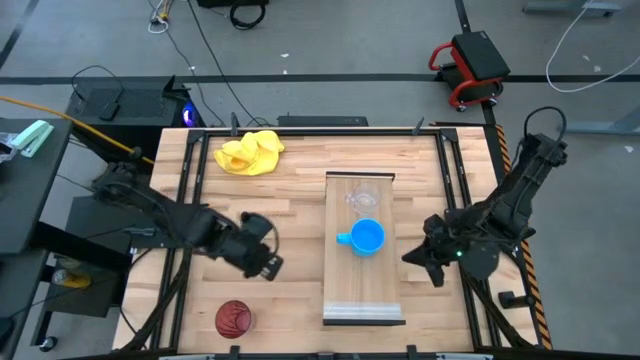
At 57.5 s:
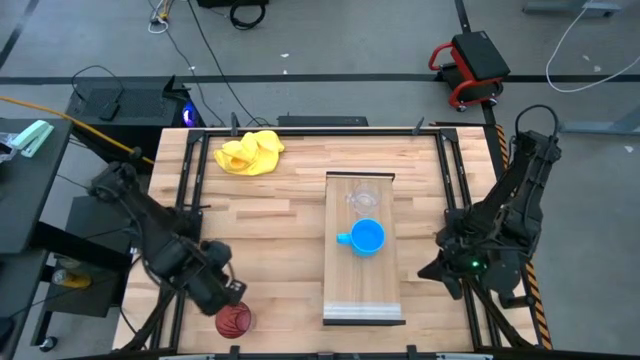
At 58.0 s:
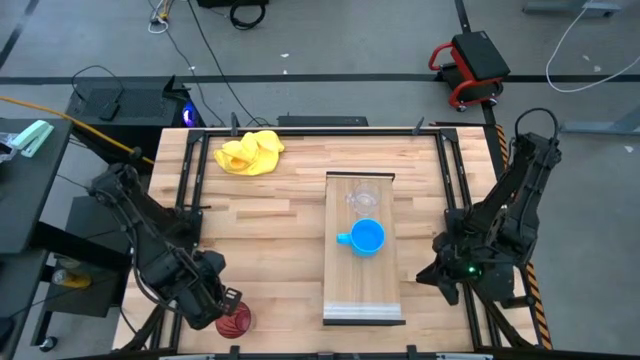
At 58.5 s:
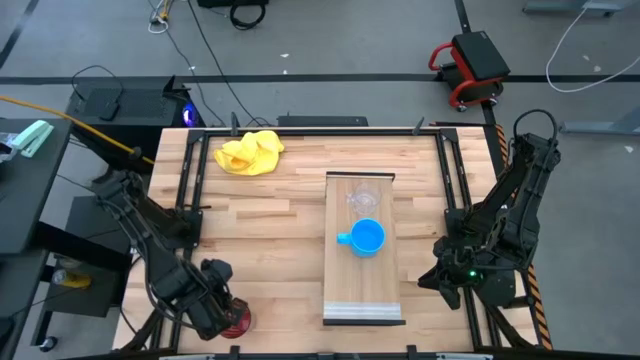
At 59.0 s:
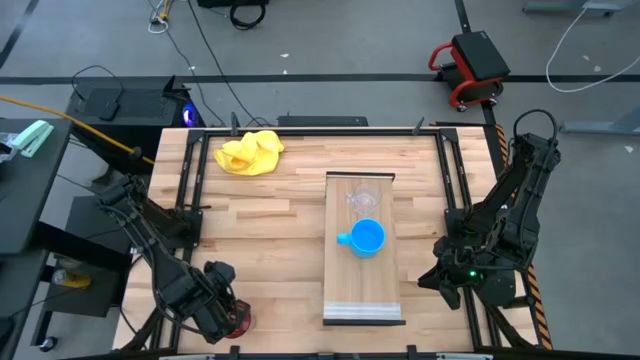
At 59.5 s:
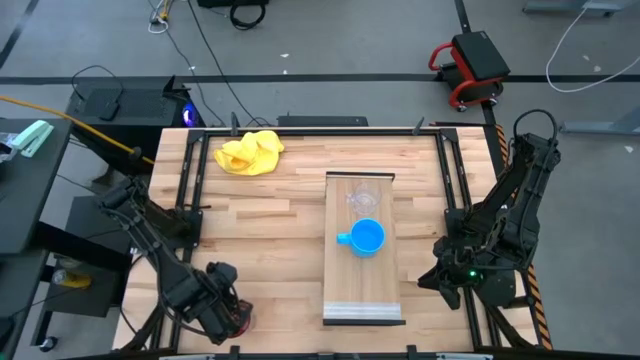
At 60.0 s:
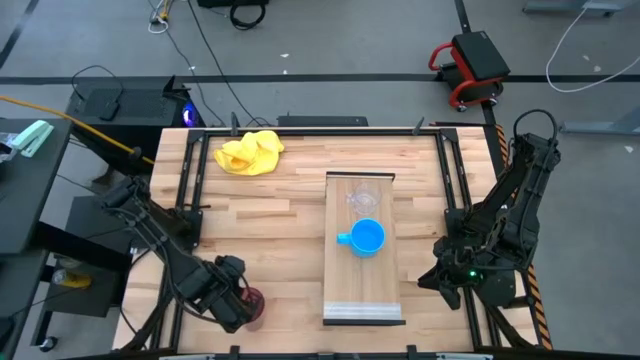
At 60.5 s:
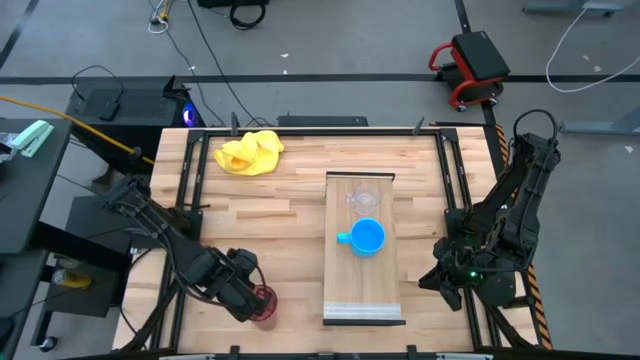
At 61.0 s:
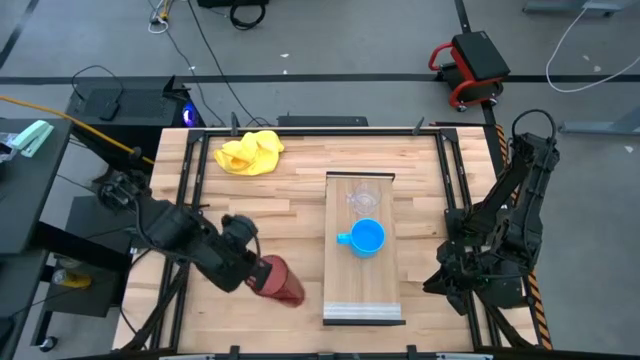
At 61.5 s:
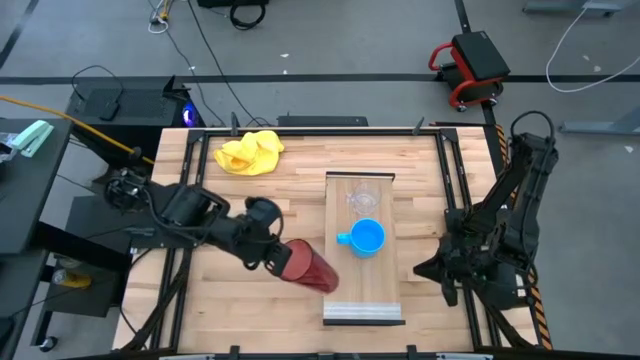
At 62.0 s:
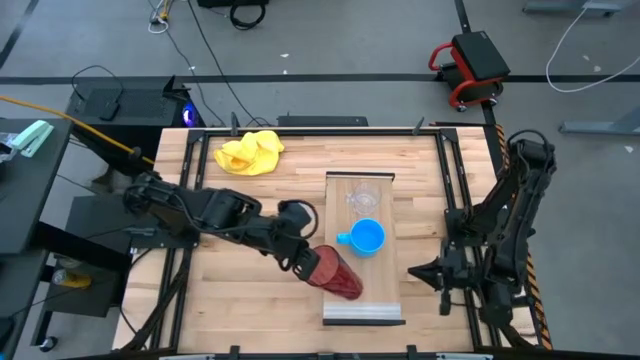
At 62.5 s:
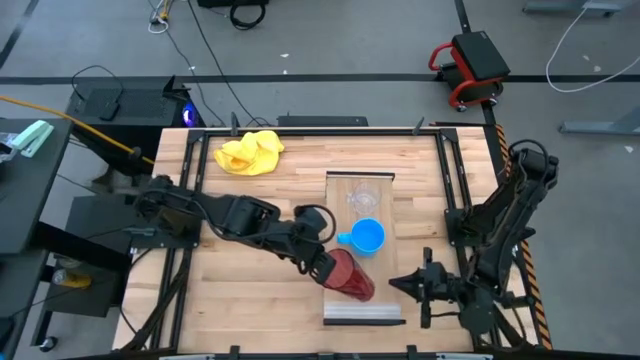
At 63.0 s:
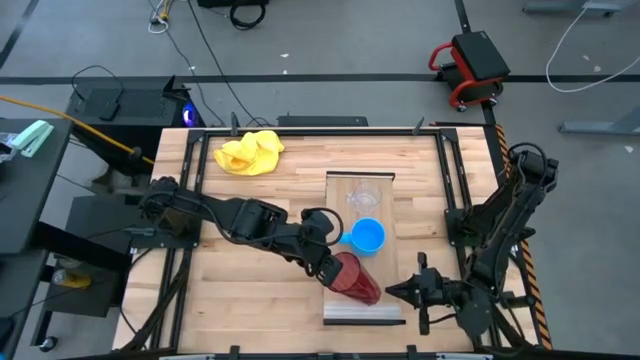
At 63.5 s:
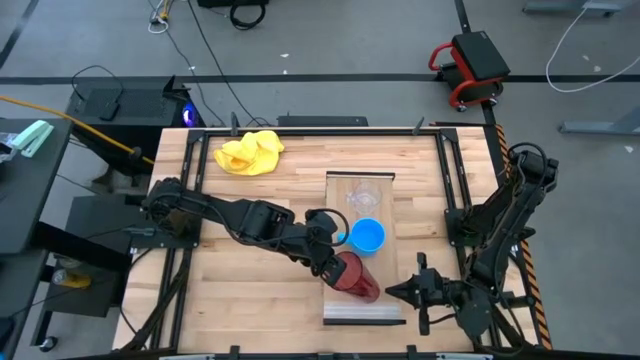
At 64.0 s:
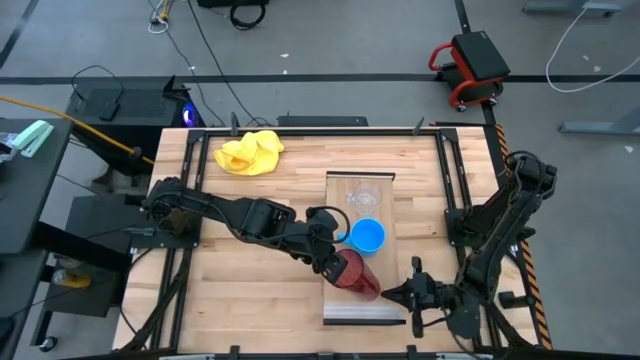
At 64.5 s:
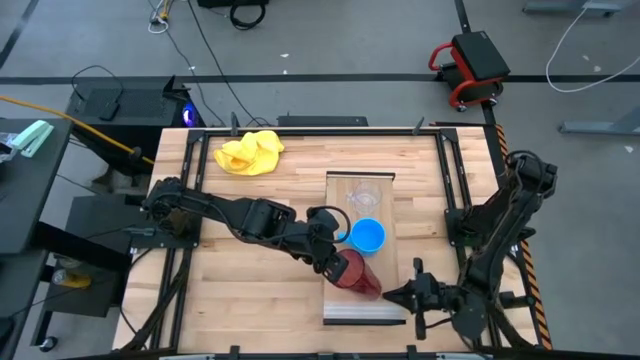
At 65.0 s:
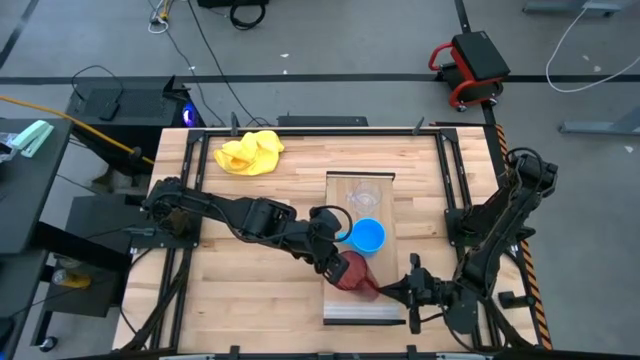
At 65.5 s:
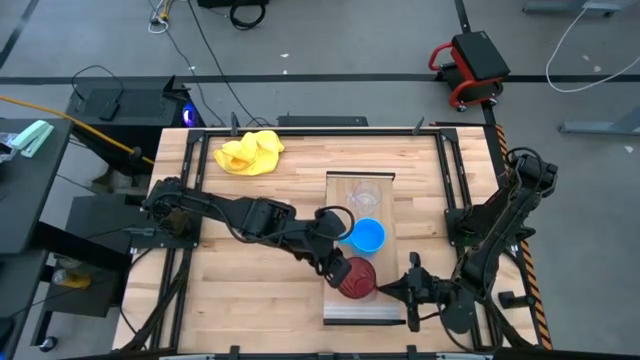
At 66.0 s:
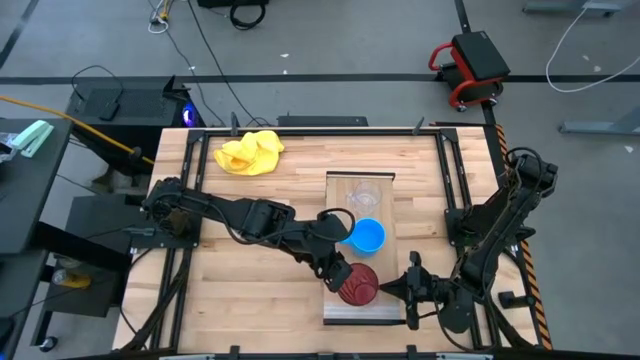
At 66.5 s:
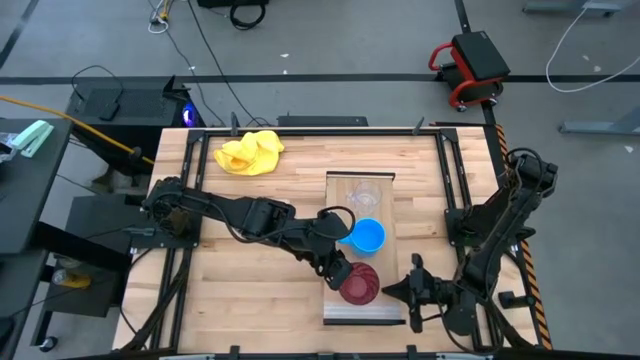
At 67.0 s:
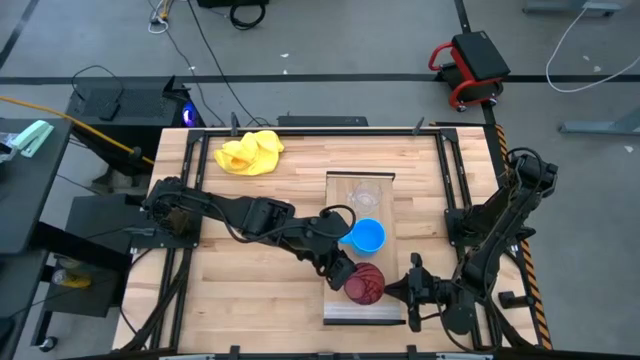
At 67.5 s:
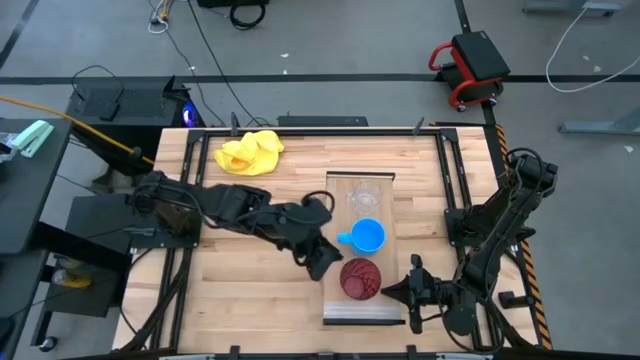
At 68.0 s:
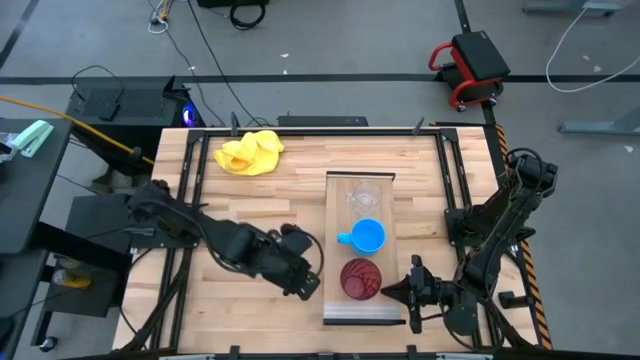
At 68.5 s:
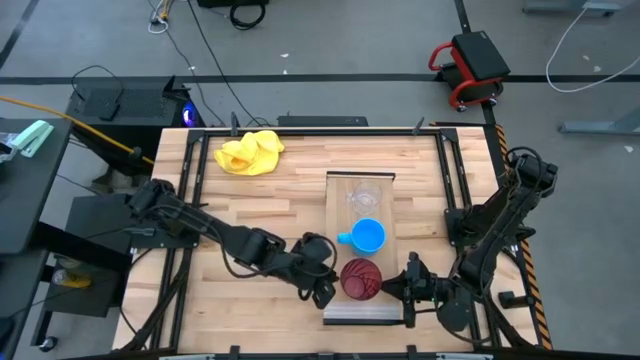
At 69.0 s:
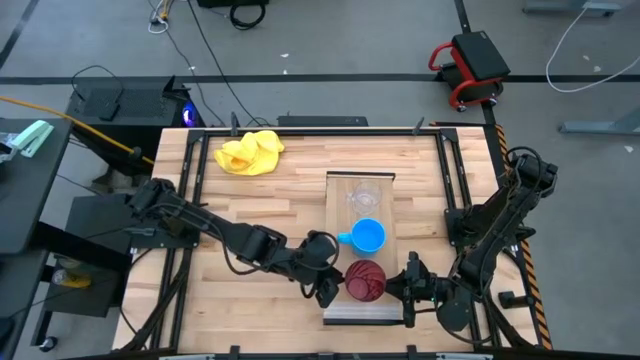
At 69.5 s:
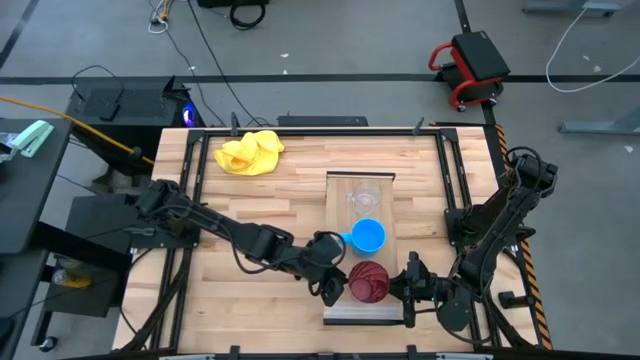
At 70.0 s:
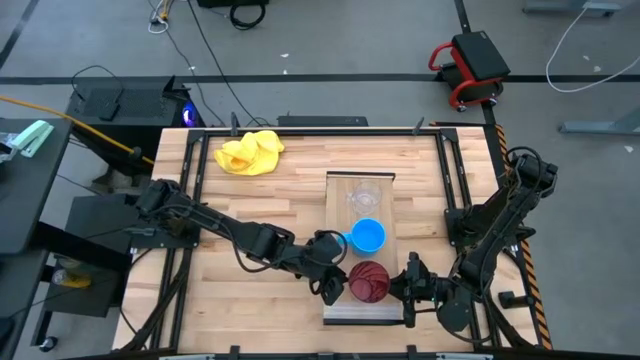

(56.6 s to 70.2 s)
Task: Stack small to large cups/mugs on shelf
Put the red cup on the shelf

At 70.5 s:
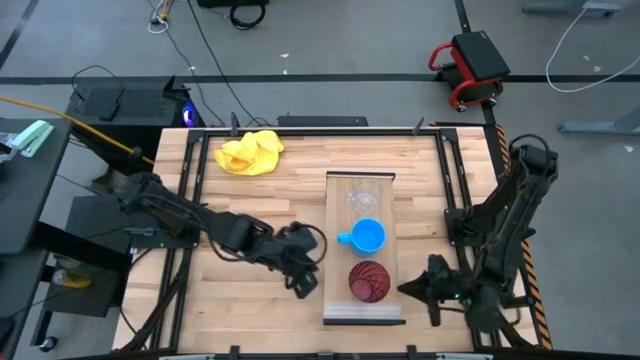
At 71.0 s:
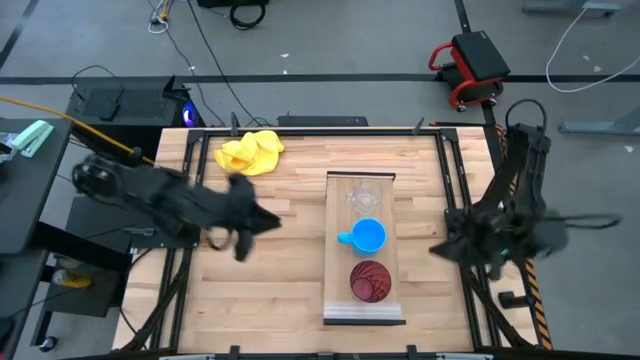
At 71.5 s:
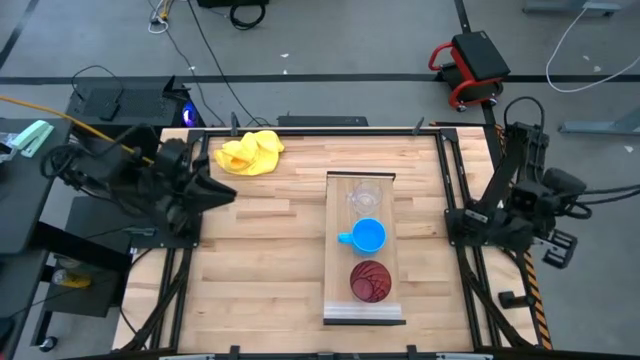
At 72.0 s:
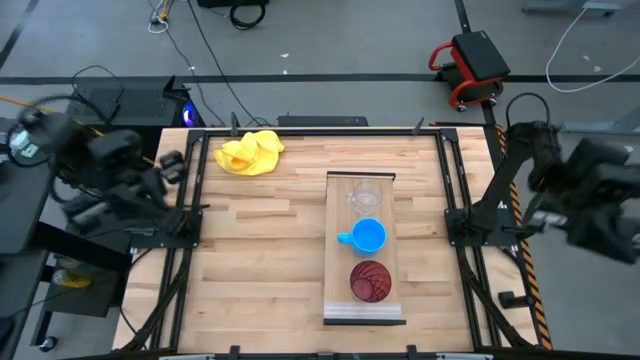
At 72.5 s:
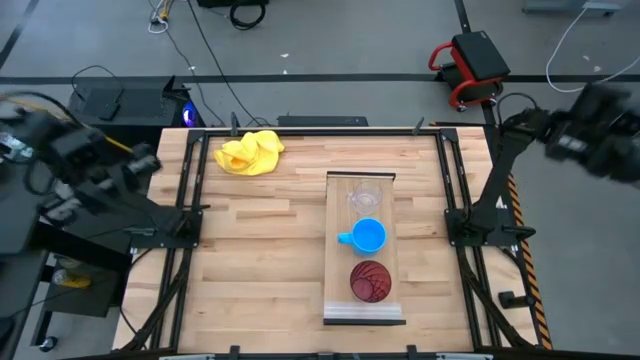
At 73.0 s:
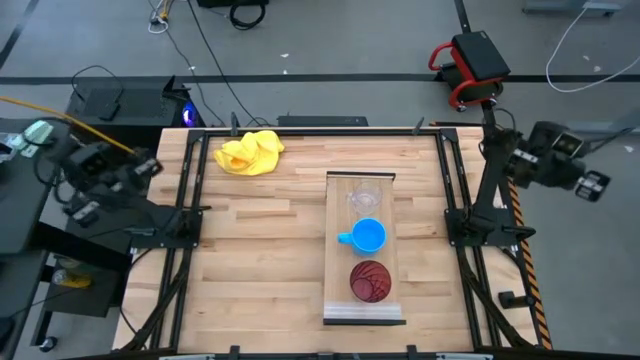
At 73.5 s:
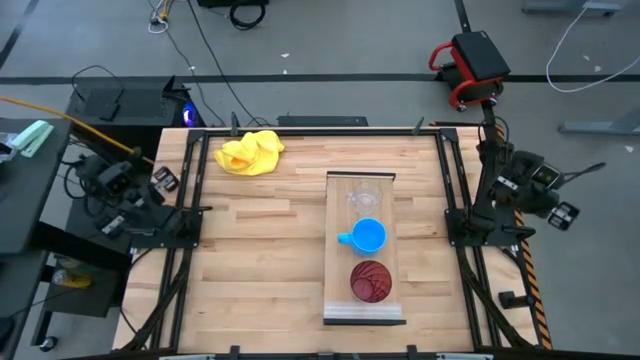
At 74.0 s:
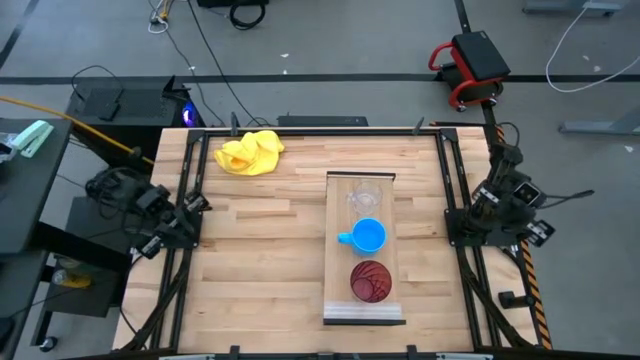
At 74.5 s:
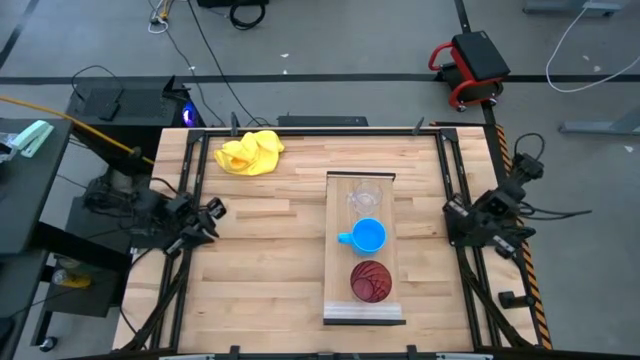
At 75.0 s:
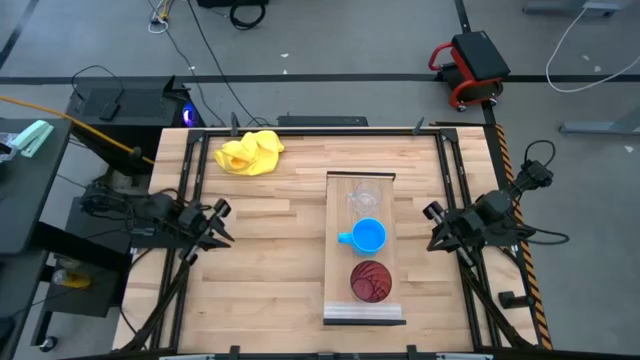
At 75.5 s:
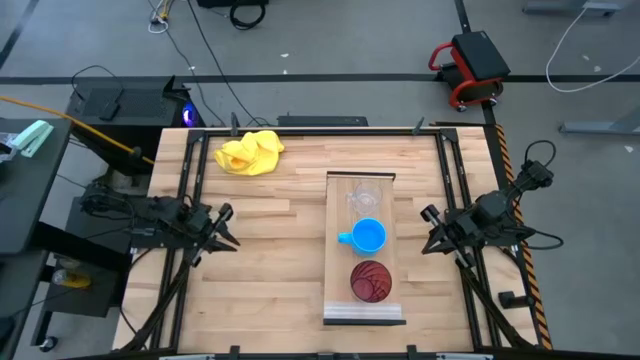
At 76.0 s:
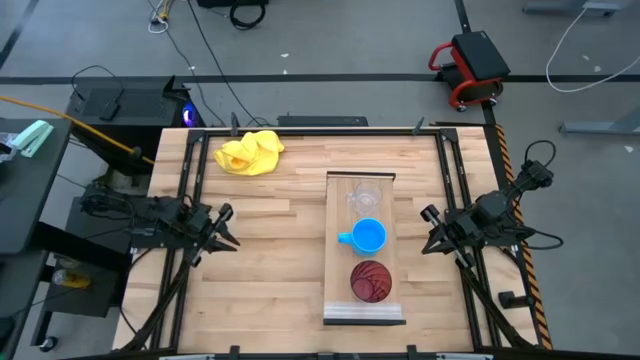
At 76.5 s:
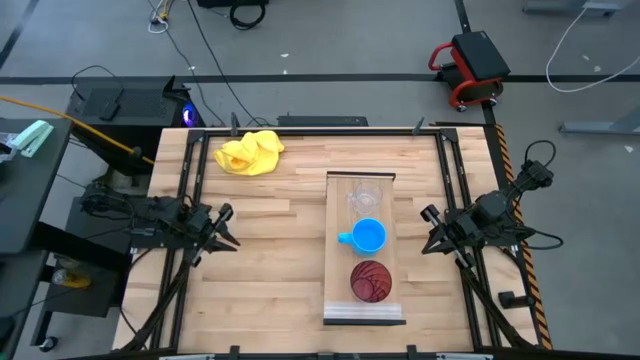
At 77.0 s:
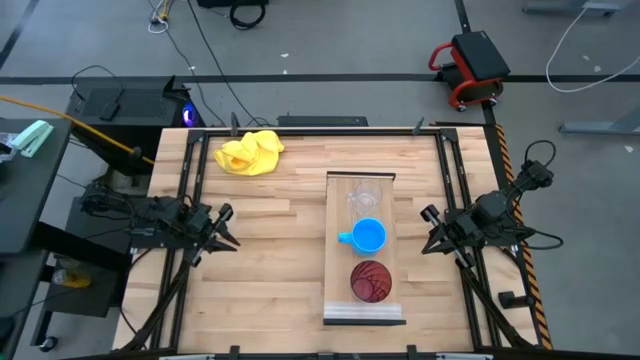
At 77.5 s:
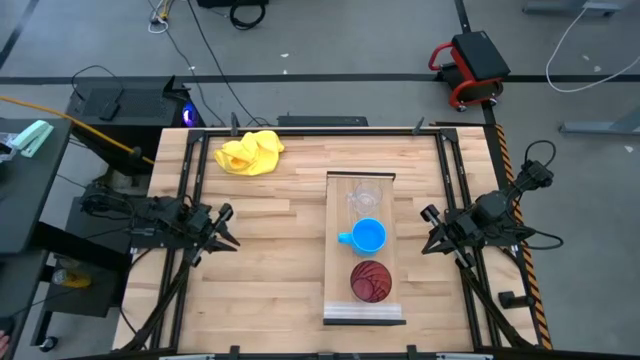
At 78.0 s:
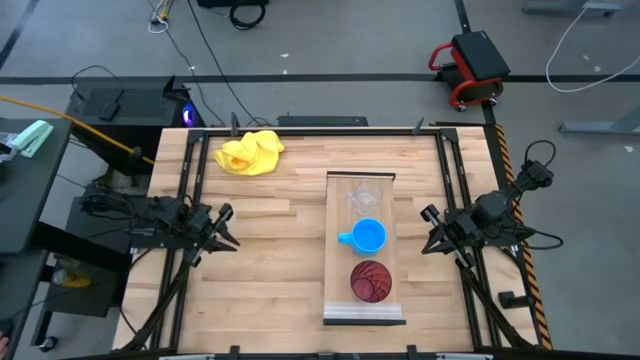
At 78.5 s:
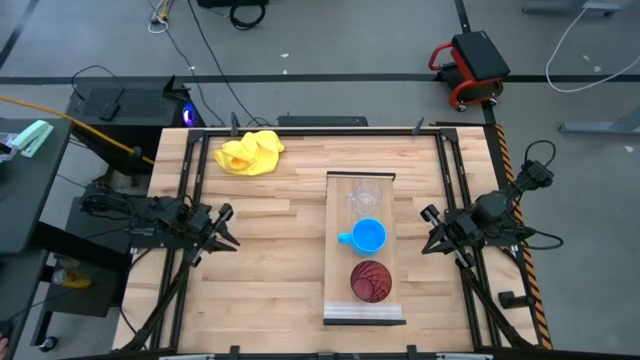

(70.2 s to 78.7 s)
Return to Home Position
